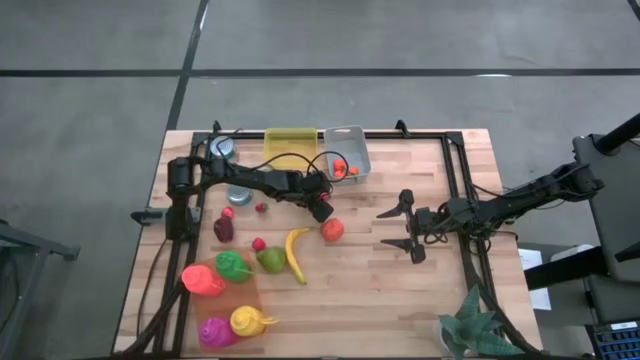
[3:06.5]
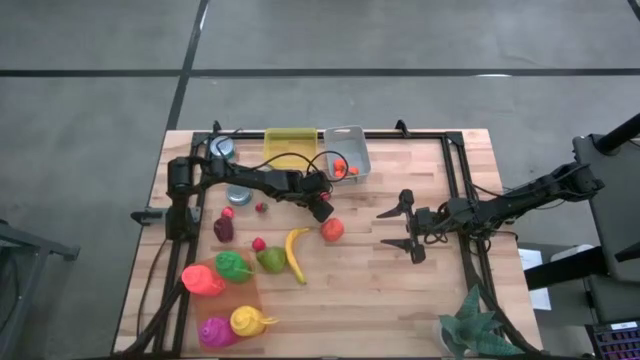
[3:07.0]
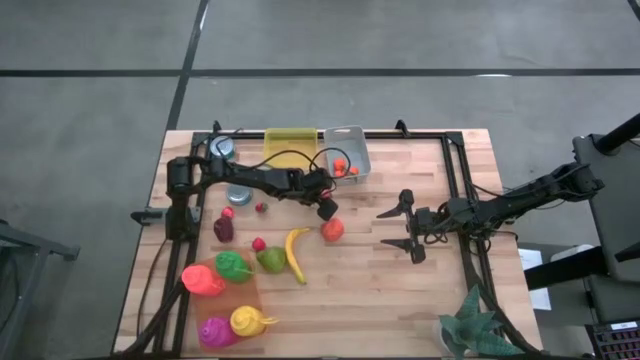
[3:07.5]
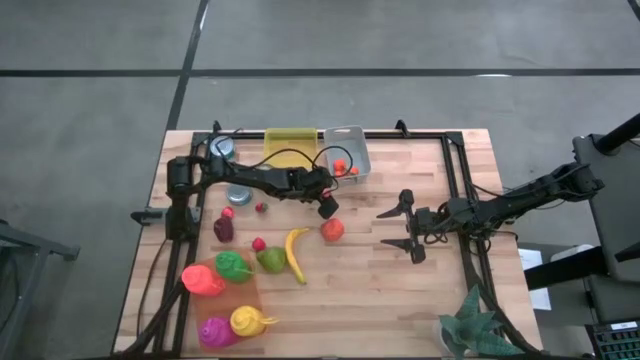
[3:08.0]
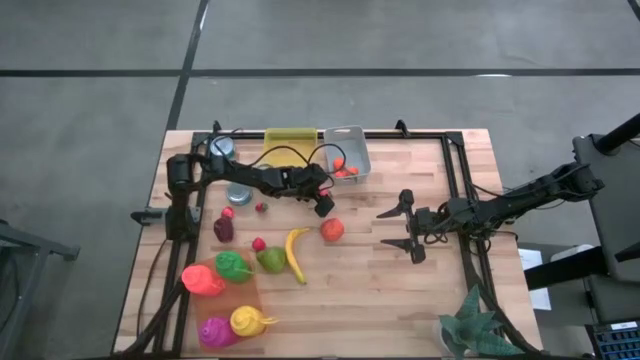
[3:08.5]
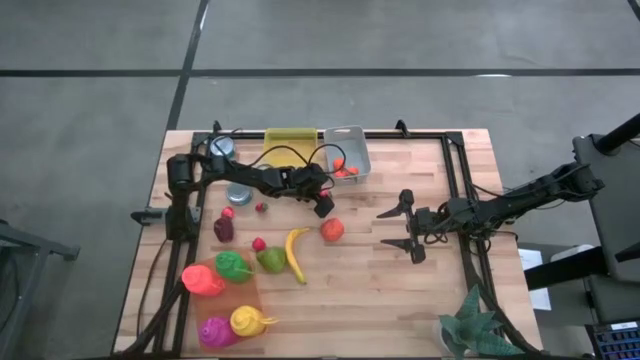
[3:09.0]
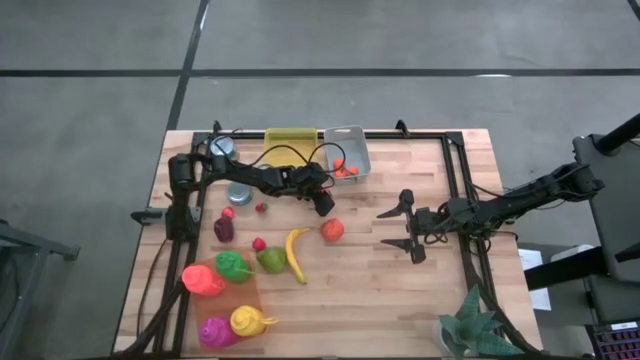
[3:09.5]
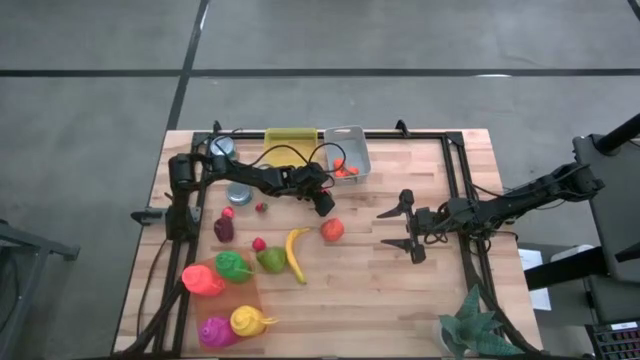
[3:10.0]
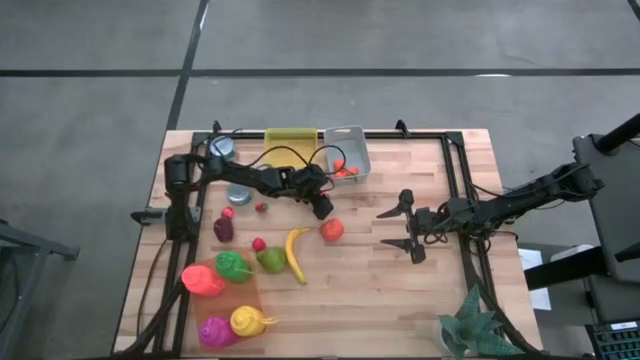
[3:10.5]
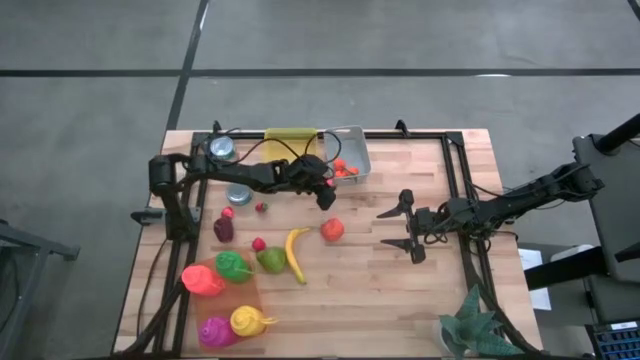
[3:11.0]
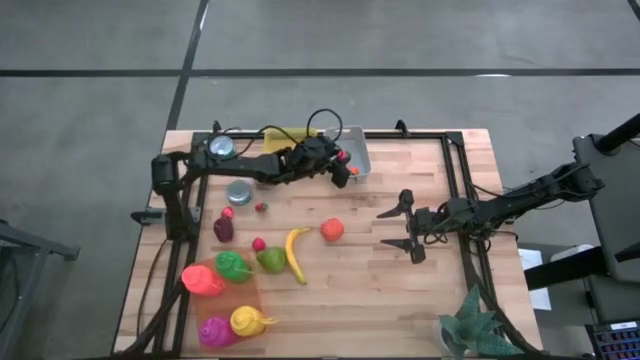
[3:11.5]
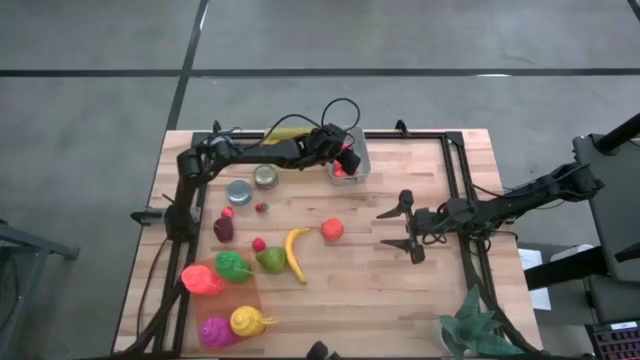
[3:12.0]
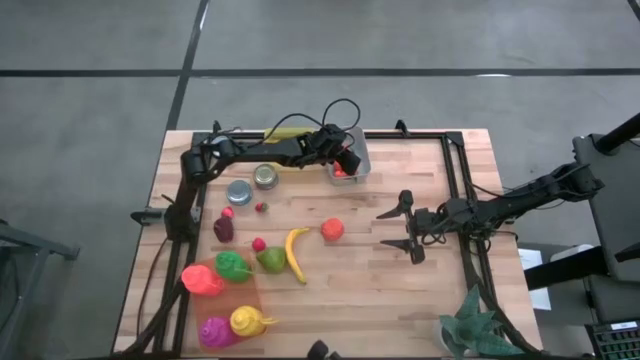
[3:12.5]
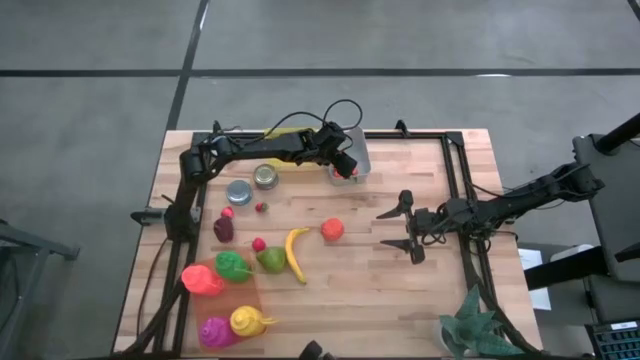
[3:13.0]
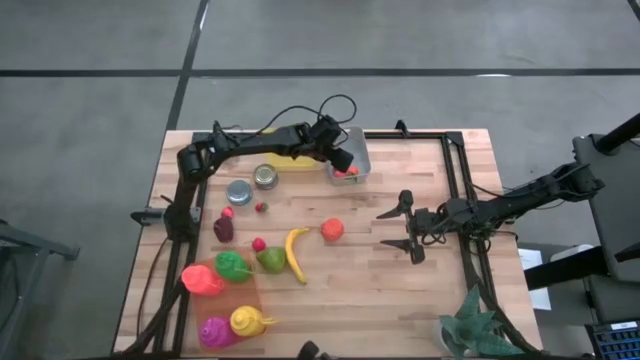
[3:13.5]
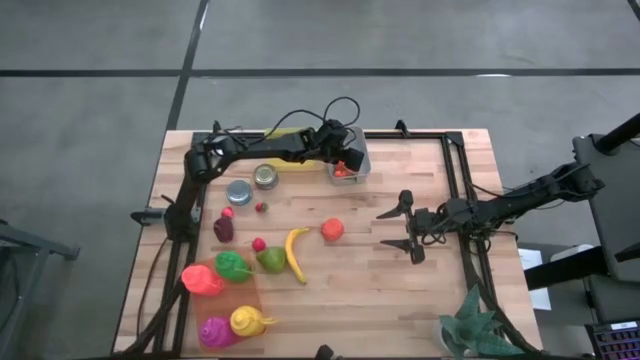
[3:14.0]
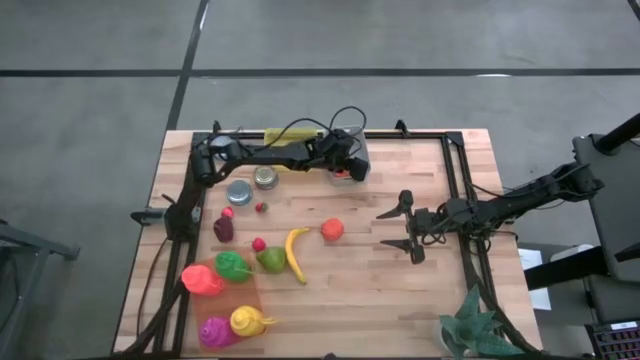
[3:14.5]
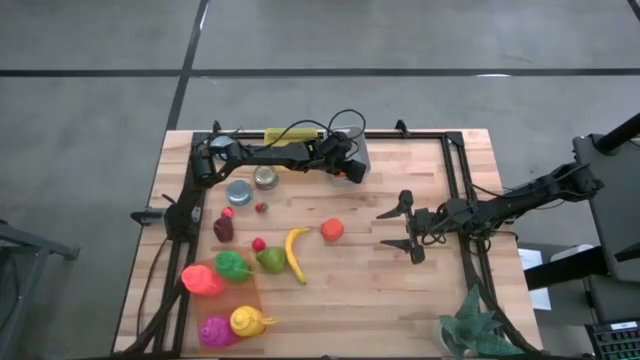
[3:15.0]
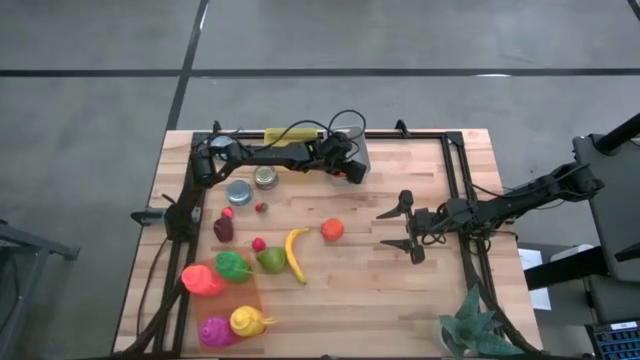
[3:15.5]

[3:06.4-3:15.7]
Task: Pick & Place Food Item
Put the red strawberry into the gray bin

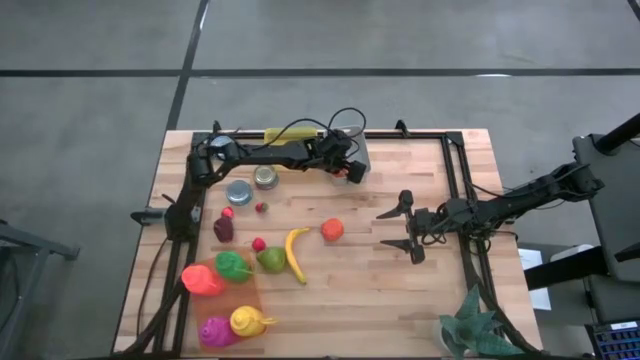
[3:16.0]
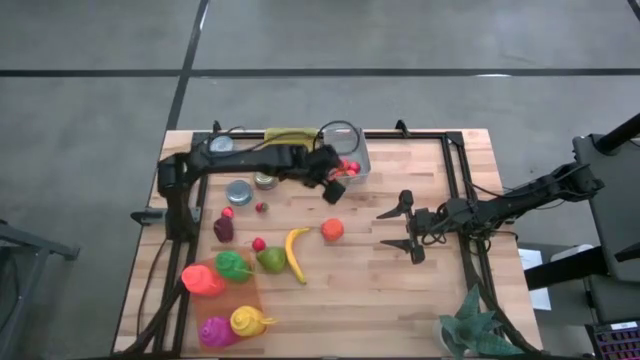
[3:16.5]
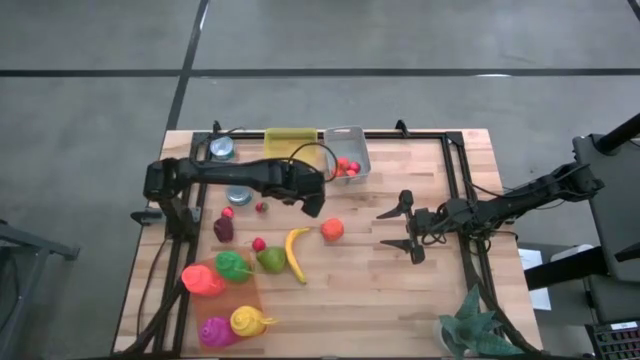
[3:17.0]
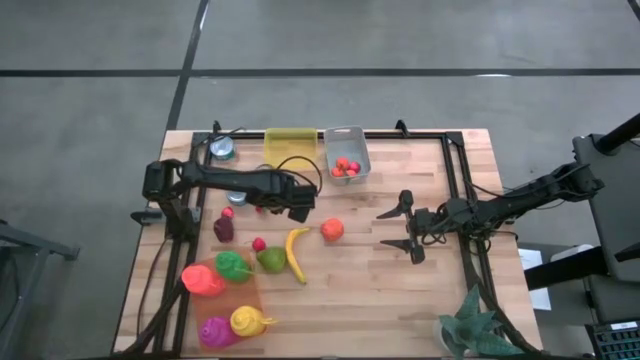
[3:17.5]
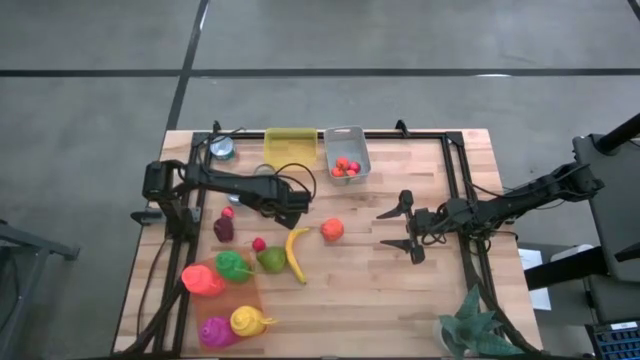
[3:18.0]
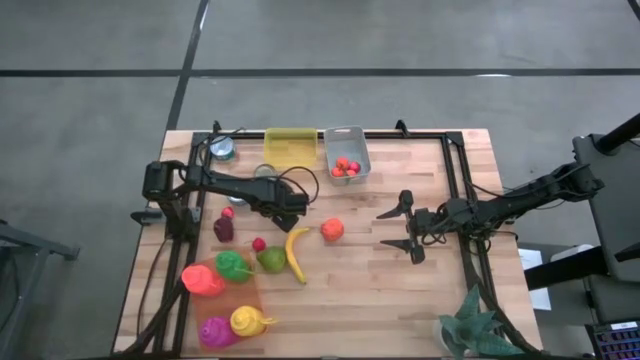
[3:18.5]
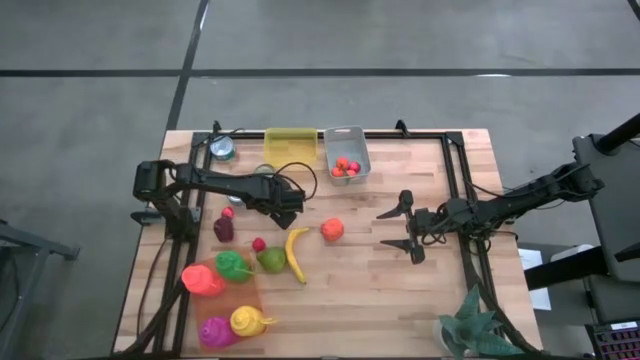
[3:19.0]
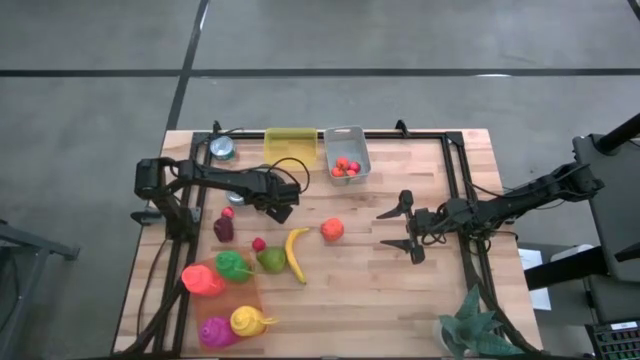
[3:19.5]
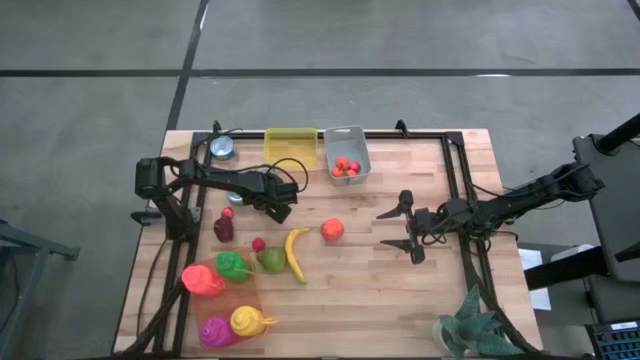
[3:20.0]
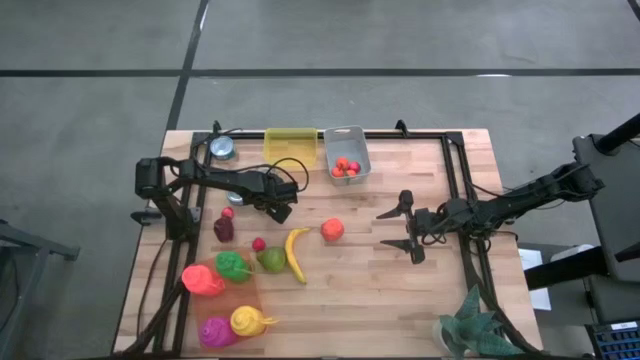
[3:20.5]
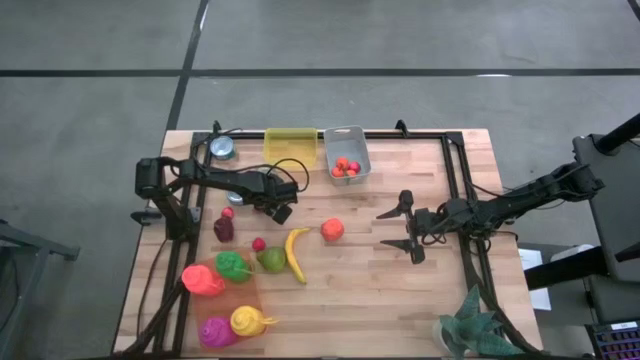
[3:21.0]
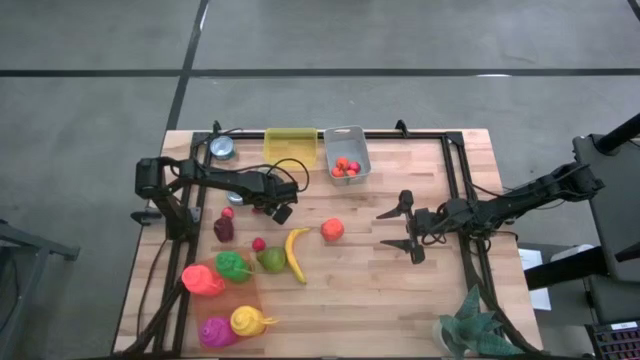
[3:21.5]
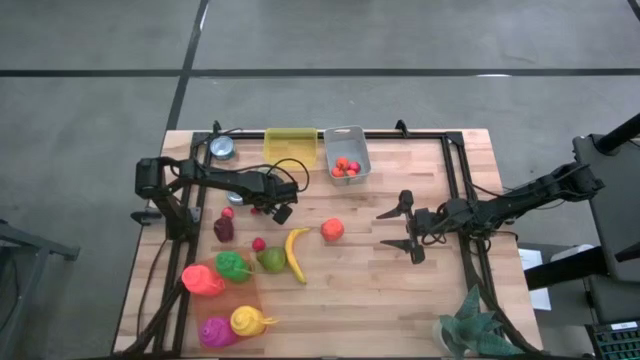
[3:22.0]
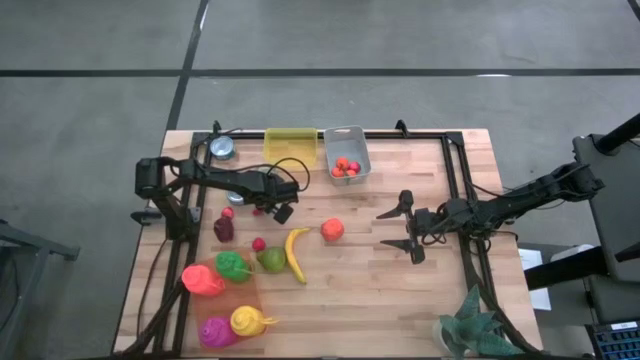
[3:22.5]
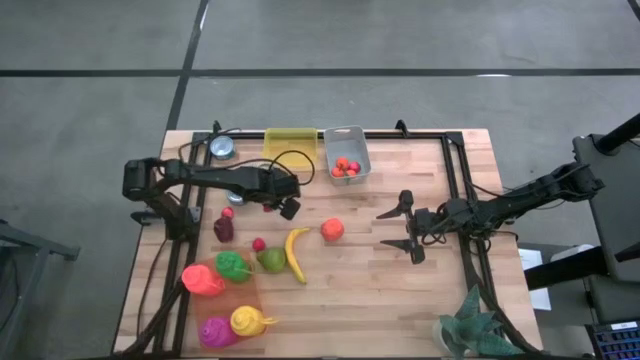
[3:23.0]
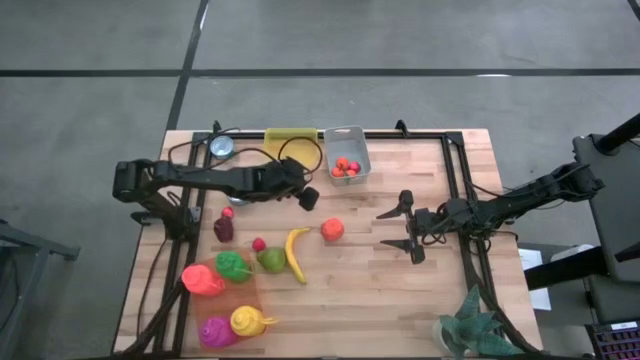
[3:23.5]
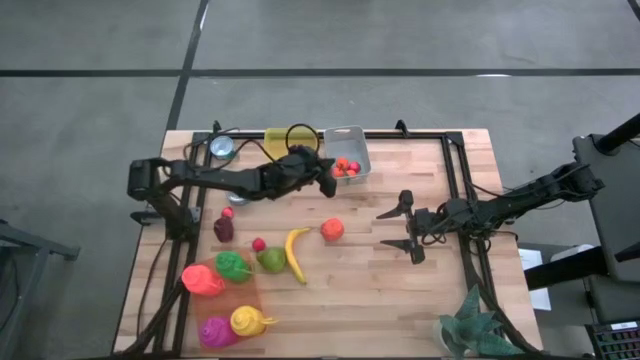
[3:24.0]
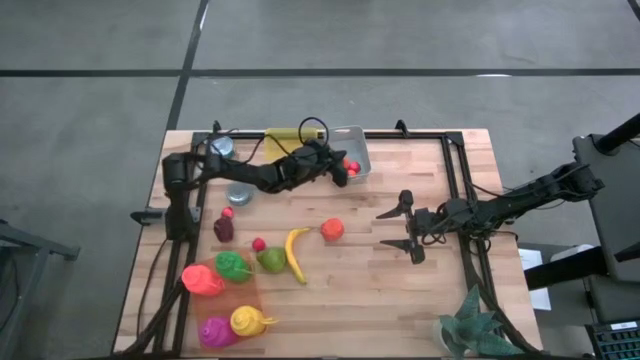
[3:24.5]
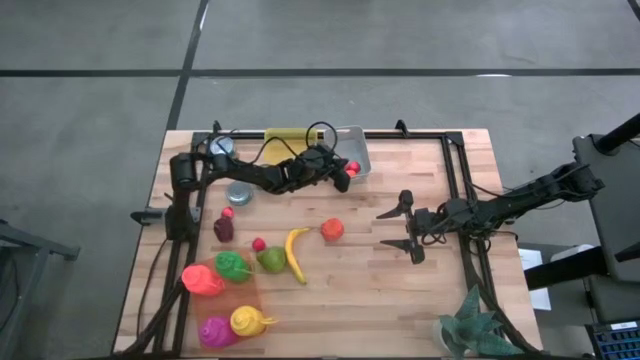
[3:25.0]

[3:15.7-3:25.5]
Put the red strawberry into the gray bin
